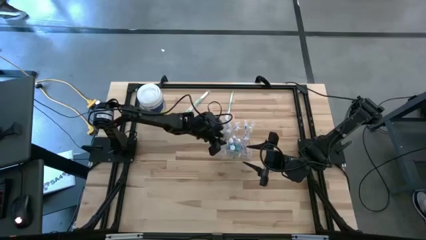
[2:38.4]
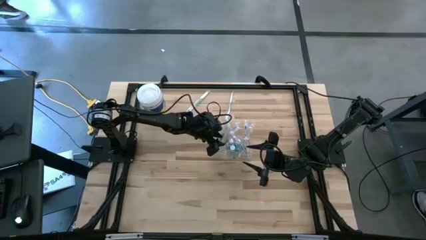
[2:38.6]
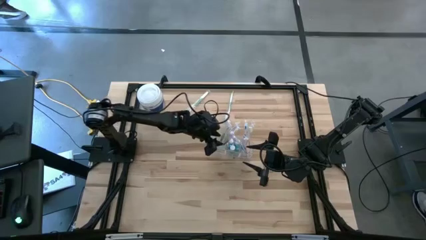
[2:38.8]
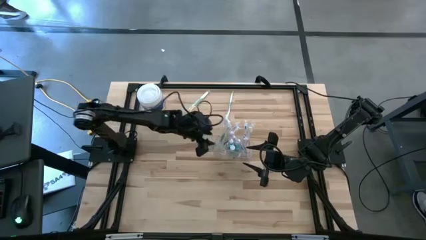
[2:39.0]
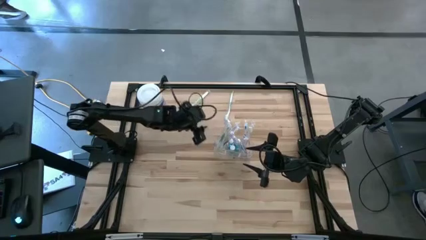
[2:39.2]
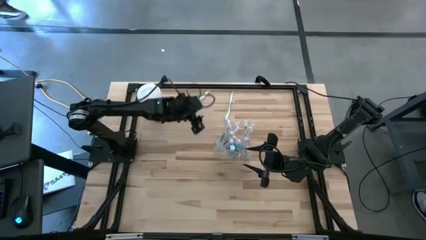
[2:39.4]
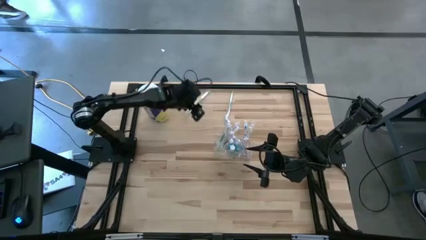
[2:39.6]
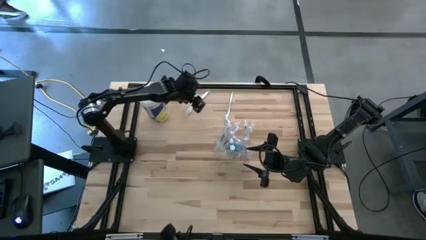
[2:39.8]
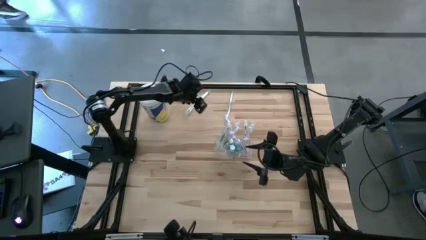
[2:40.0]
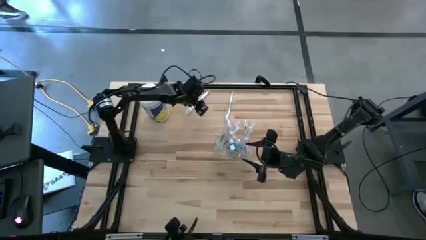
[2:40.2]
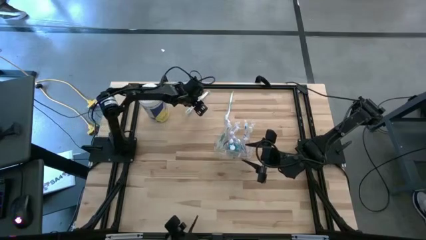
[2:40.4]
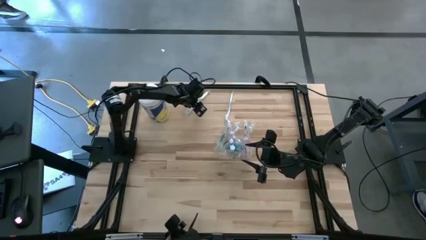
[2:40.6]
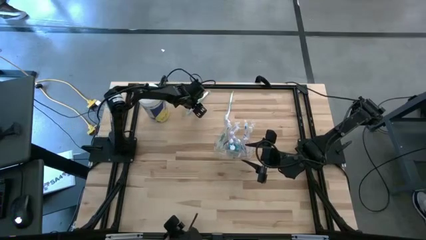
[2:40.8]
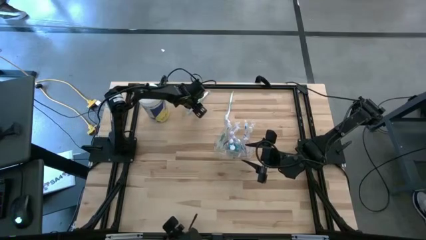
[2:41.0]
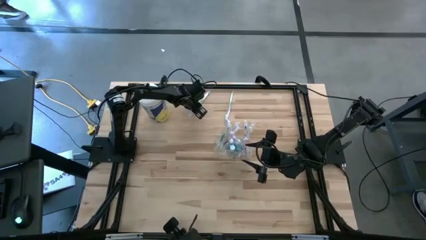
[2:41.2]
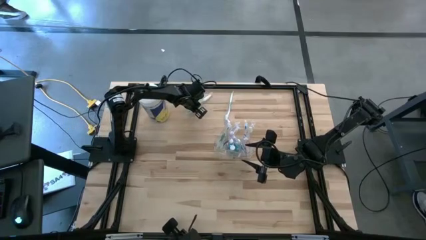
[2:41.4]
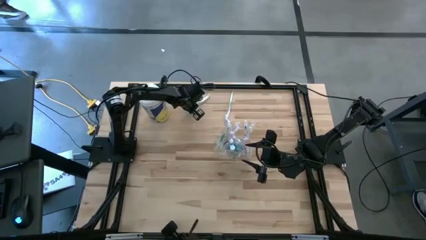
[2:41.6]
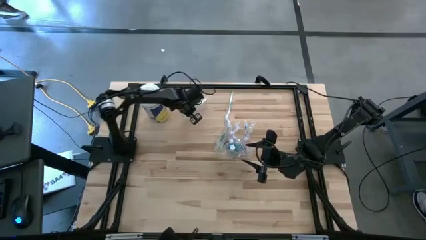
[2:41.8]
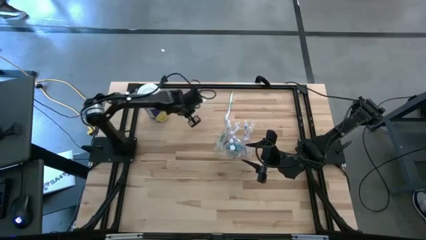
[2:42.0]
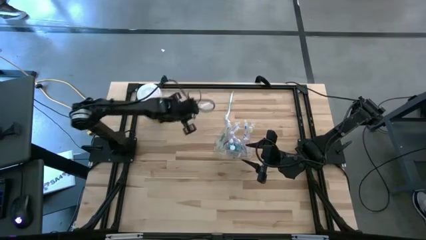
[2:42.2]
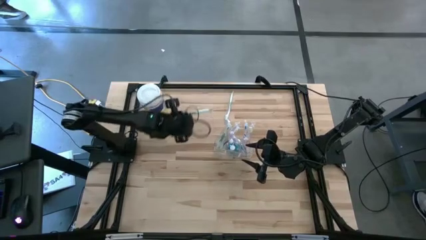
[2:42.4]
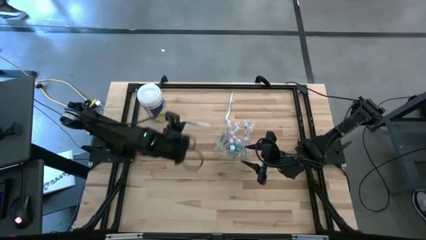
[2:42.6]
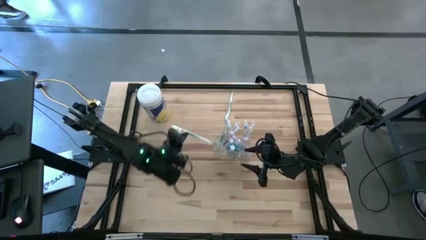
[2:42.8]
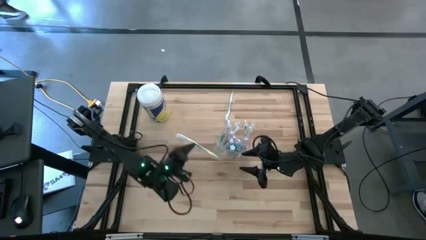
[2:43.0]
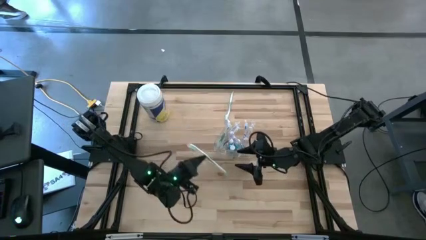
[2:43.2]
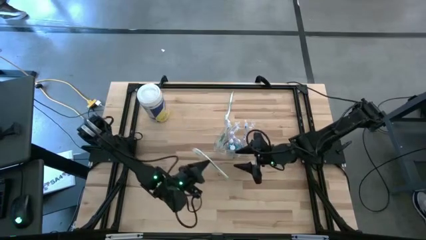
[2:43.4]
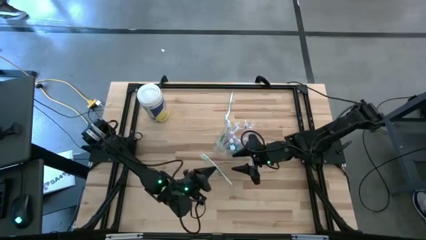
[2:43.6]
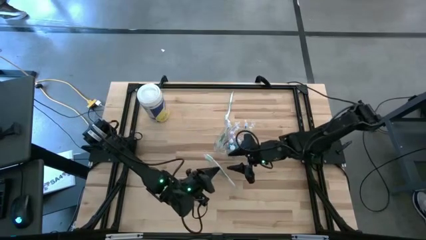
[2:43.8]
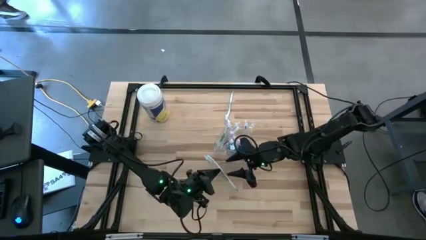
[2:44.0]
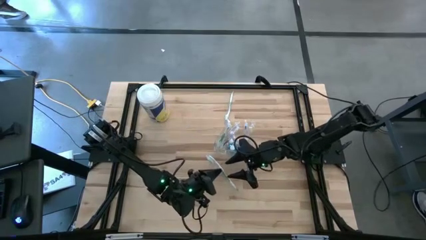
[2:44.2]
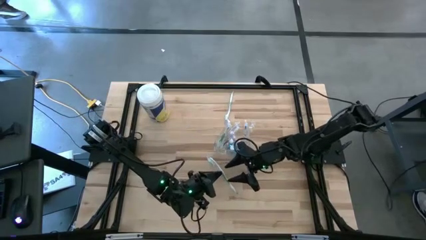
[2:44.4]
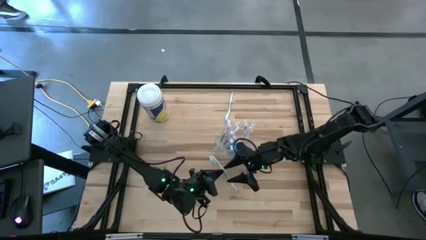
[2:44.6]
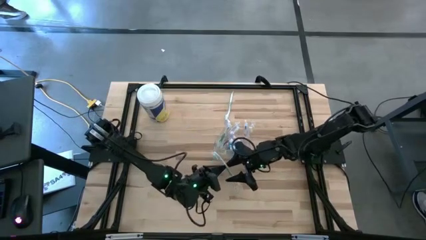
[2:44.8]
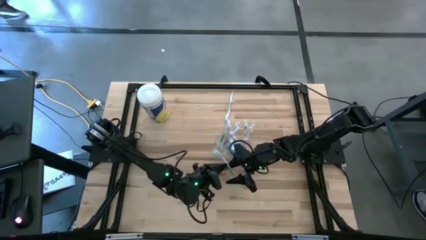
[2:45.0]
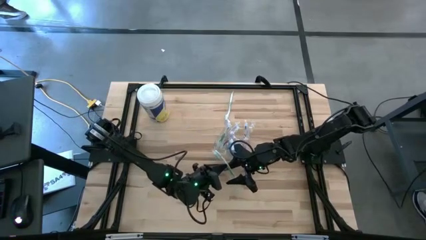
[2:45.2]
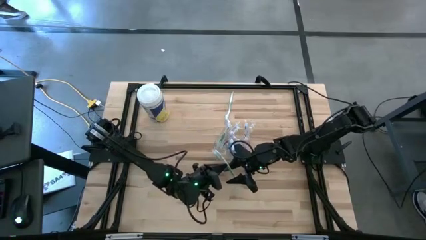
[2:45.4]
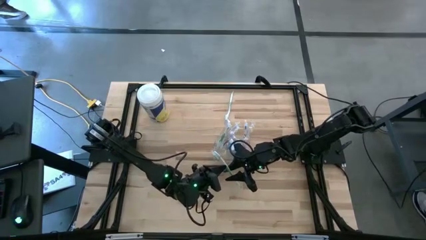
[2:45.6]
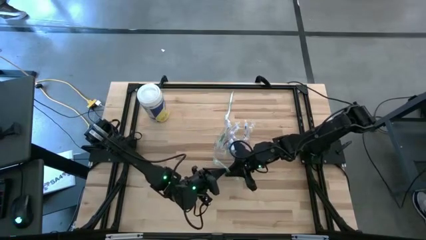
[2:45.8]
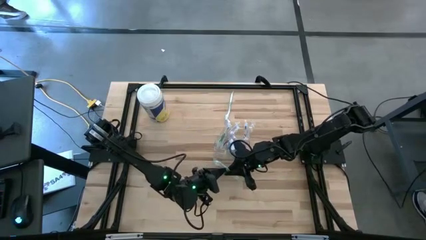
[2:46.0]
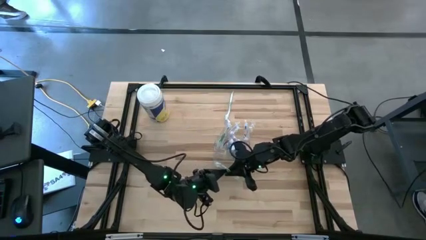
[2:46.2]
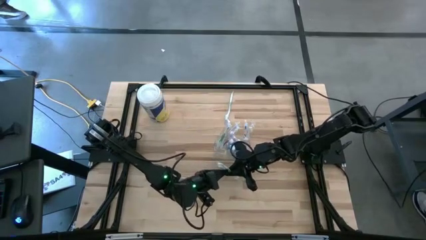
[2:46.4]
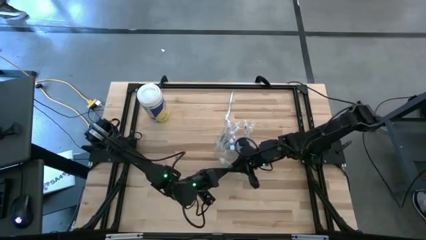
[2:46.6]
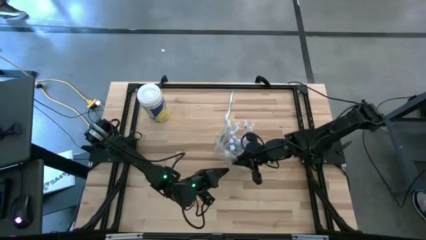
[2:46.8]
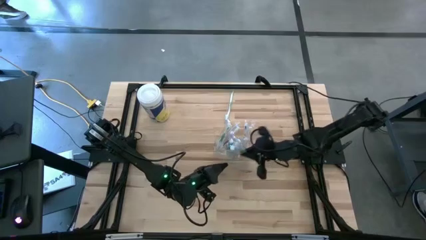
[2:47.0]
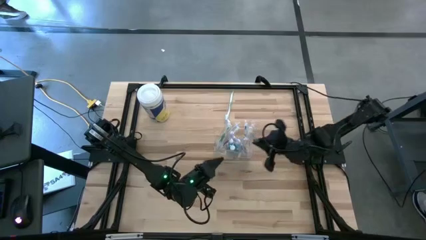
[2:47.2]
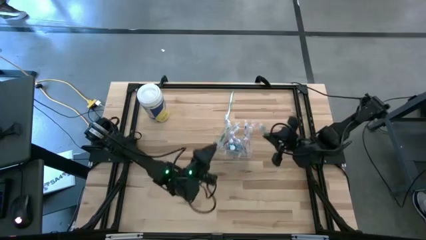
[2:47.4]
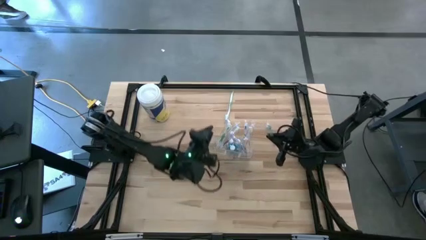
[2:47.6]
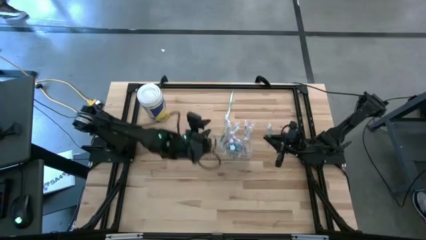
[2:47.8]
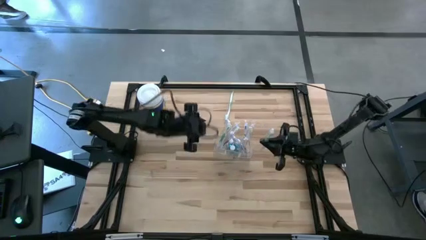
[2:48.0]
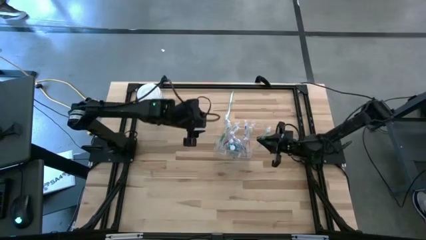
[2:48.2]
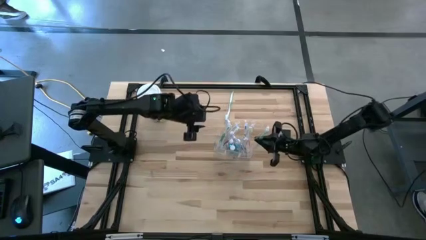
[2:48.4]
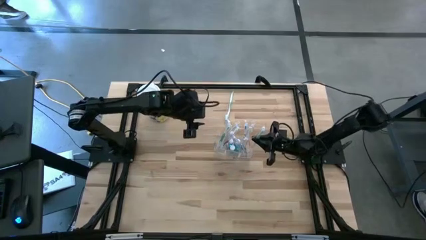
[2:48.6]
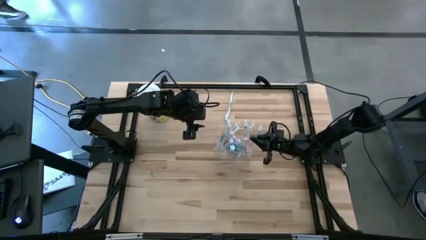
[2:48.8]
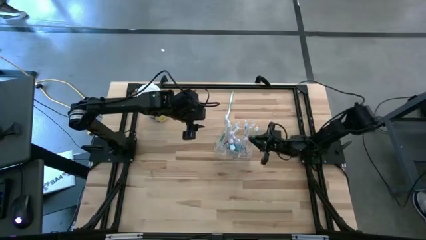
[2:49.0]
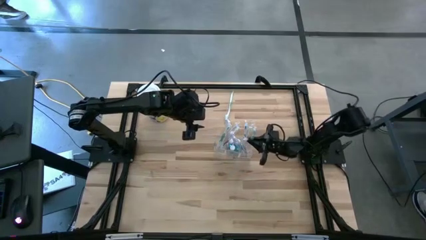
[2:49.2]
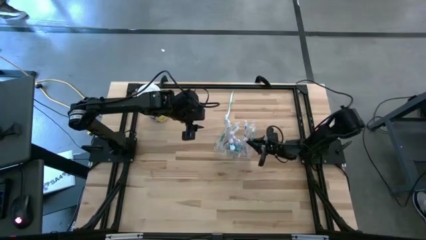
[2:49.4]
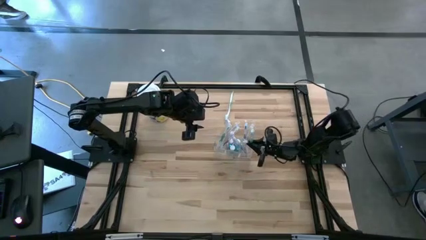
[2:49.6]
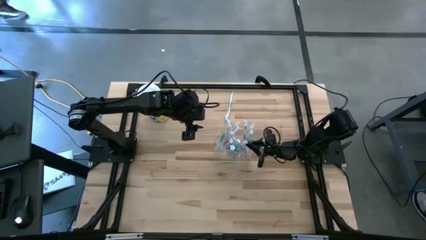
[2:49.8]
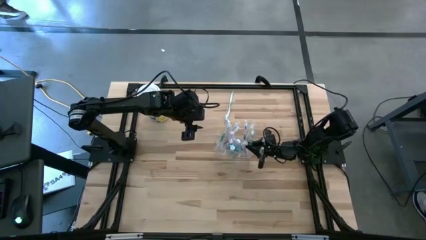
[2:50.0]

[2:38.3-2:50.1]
Task: Pick & Place toothbrushing station
Put the left green toothbrush into the right section of the transparent organizer
